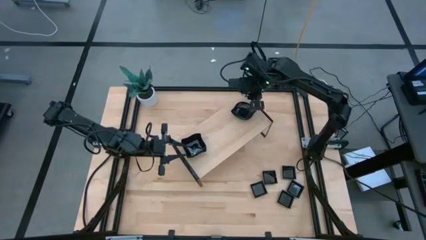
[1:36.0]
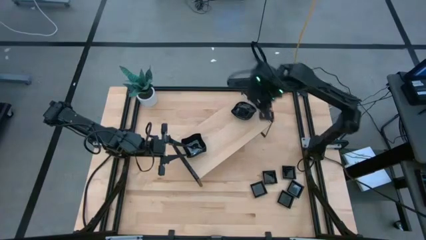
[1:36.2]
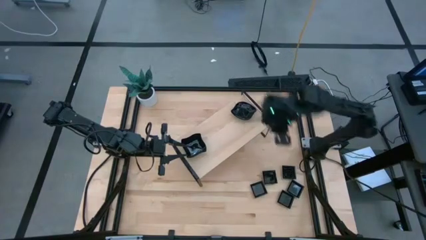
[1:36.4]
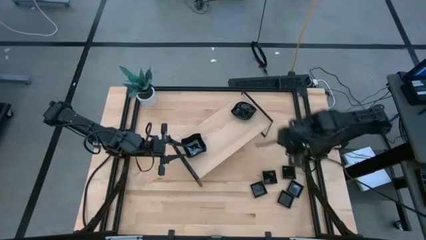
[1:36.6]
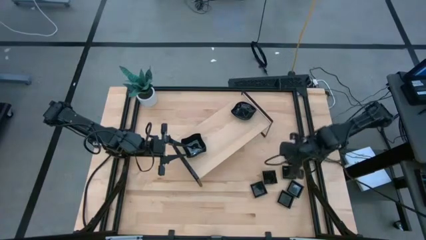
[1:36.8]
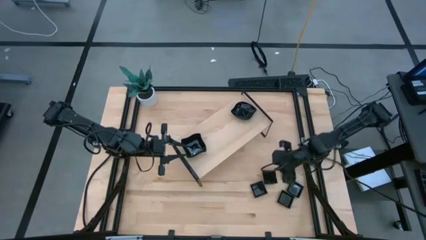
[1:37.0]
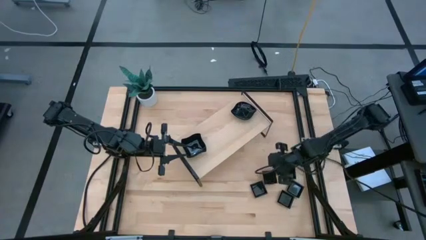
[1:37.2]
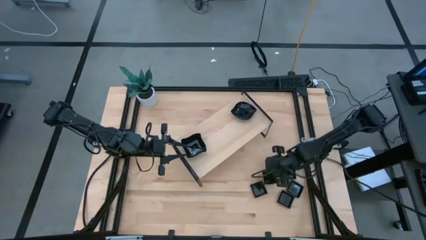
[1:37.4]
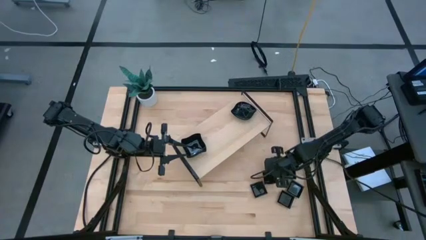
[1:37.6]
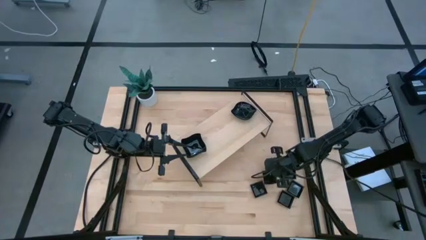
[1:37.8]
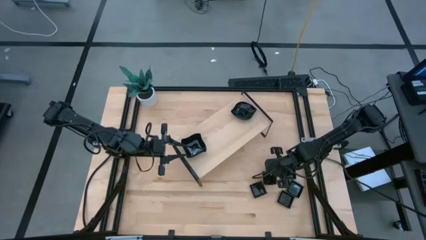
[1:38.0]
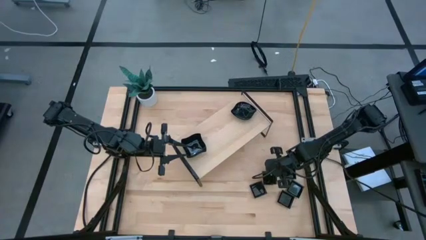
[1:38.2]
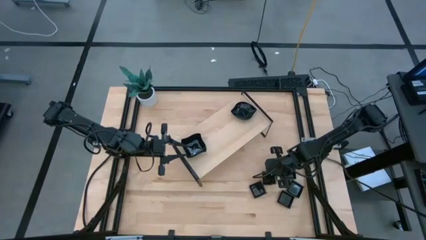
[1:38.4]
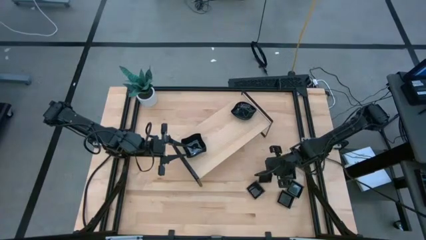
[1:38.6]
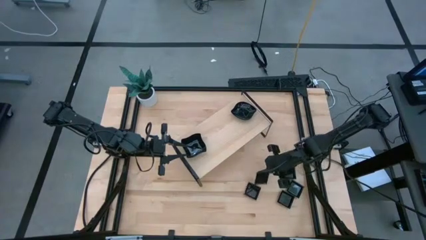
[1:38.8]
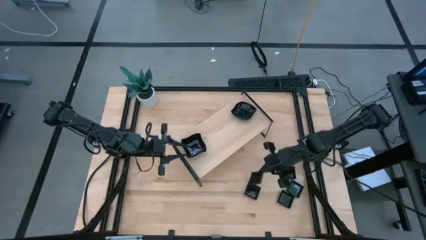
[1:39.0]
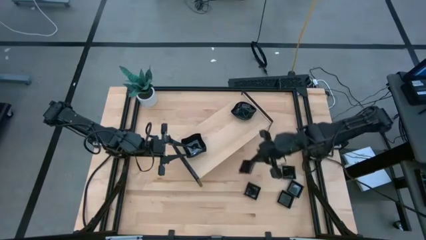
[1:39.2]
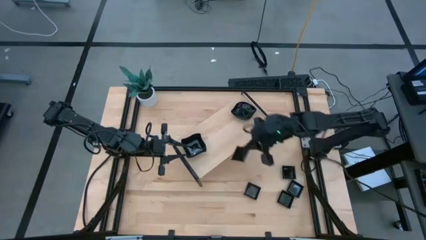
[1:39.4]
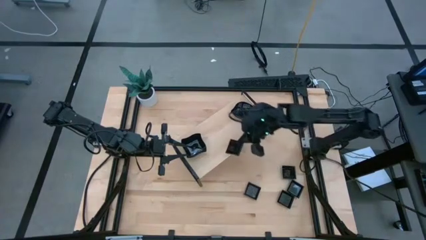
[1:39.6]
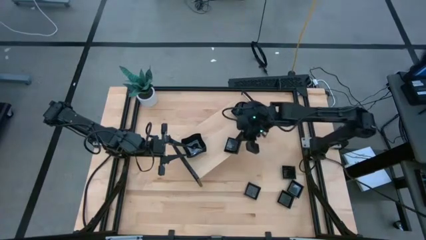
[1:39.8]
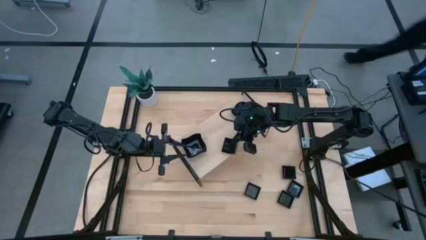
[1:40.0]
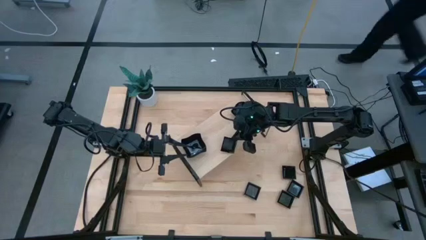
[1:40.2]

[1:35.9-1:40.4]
Task: Pick & Place Mini shaped plates
Put the square plate on the shelf

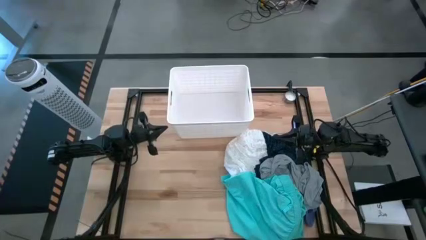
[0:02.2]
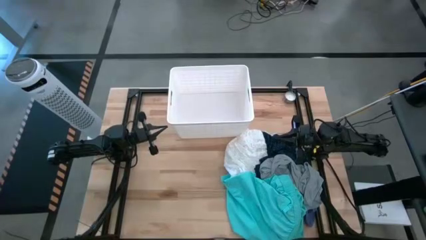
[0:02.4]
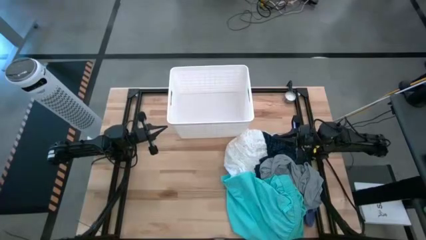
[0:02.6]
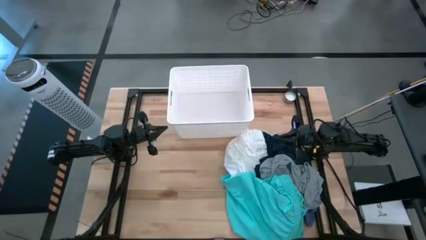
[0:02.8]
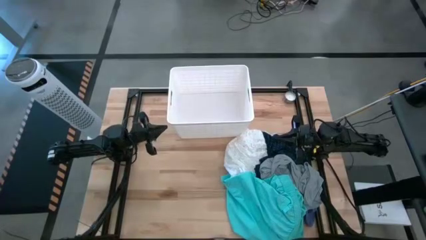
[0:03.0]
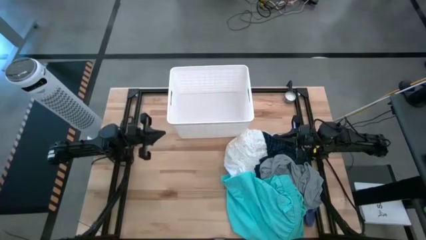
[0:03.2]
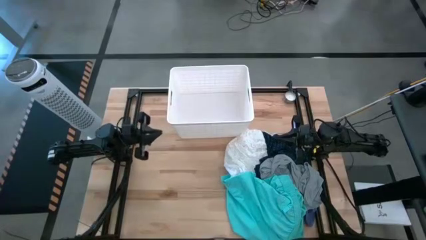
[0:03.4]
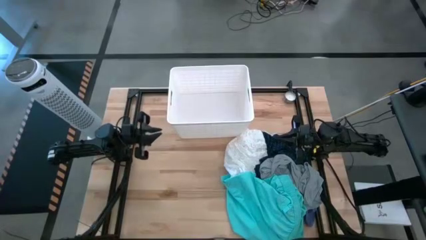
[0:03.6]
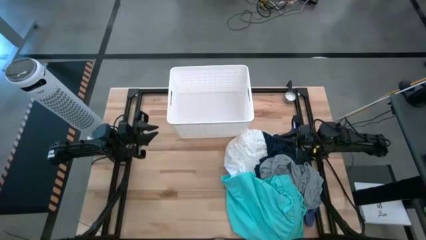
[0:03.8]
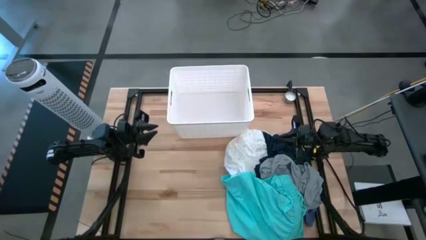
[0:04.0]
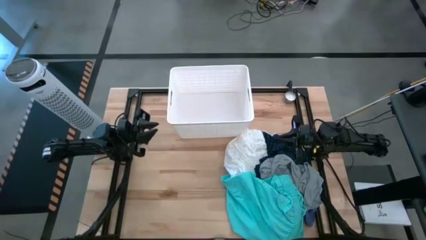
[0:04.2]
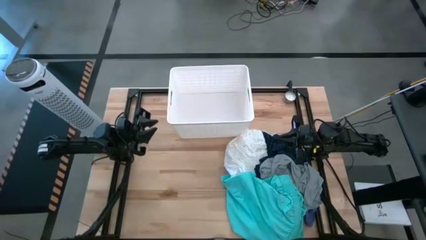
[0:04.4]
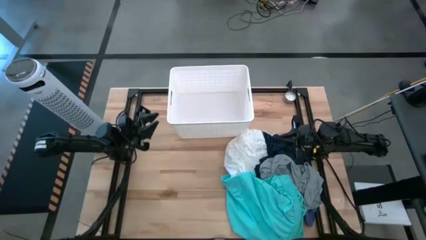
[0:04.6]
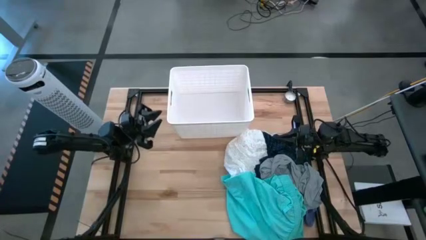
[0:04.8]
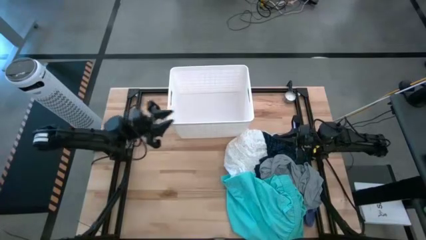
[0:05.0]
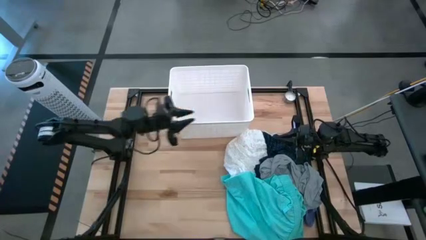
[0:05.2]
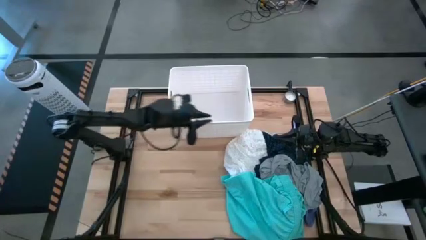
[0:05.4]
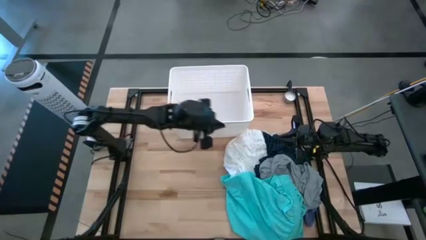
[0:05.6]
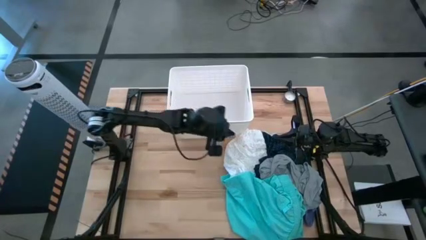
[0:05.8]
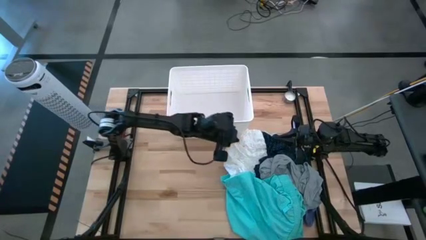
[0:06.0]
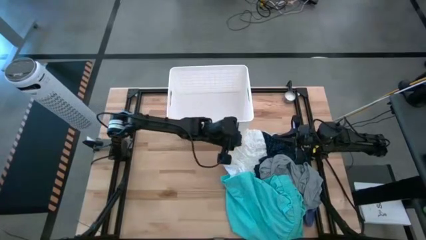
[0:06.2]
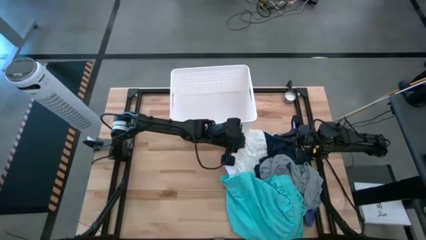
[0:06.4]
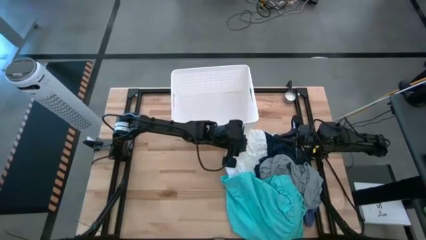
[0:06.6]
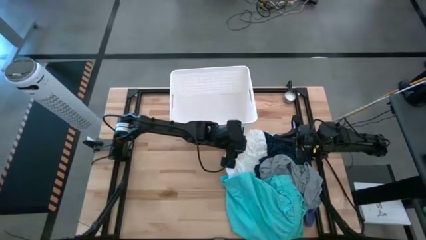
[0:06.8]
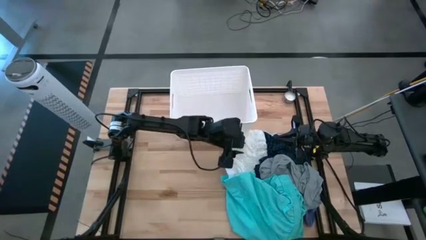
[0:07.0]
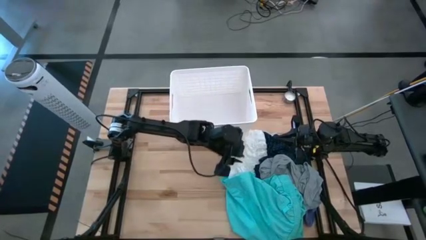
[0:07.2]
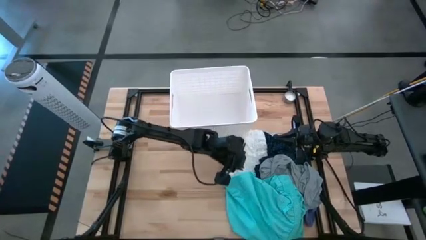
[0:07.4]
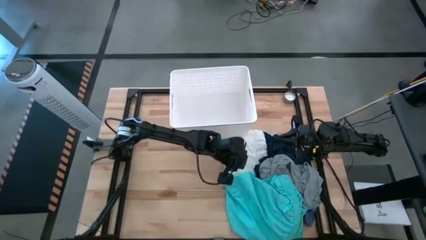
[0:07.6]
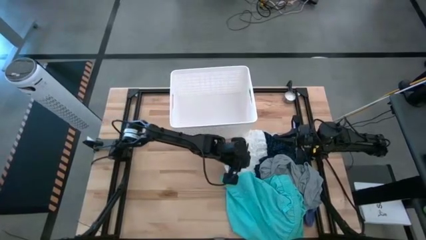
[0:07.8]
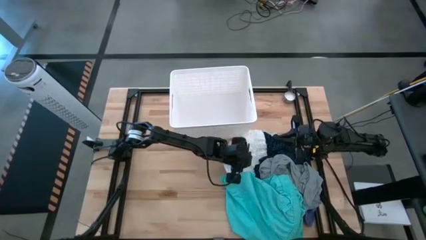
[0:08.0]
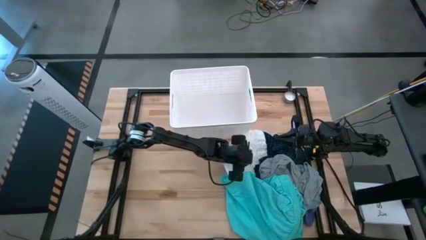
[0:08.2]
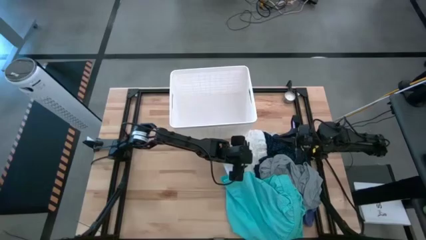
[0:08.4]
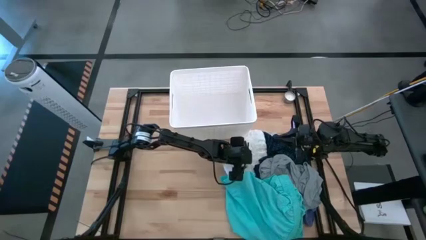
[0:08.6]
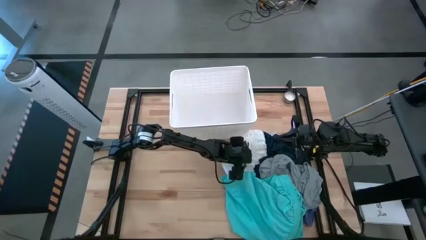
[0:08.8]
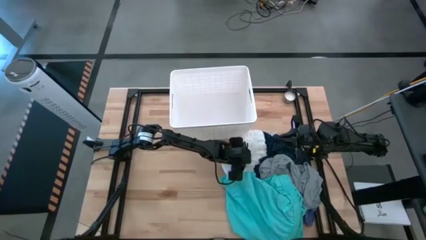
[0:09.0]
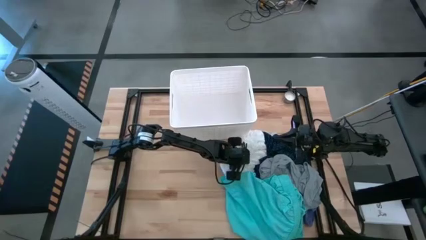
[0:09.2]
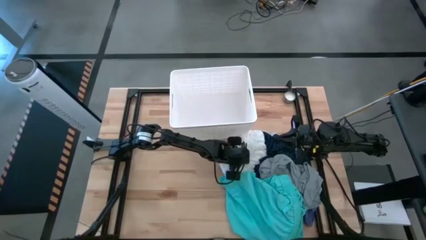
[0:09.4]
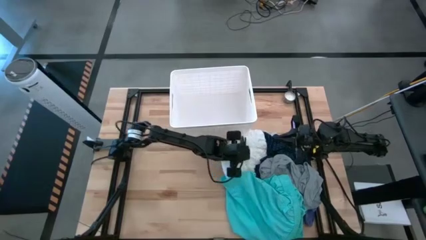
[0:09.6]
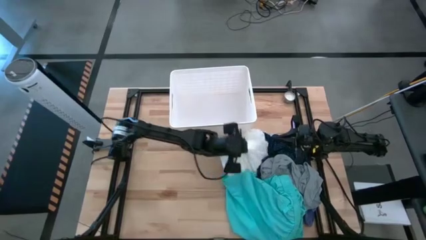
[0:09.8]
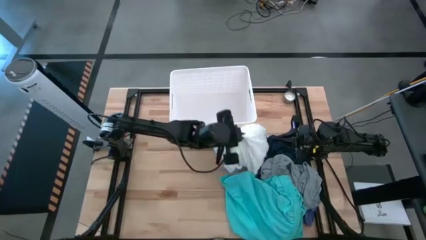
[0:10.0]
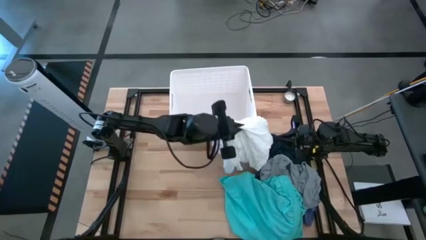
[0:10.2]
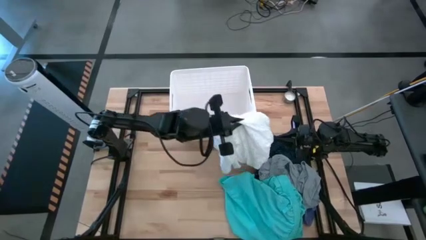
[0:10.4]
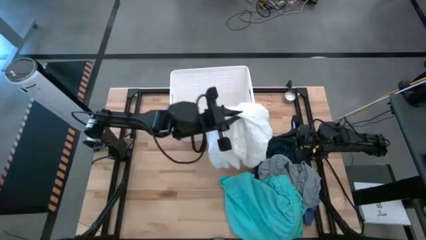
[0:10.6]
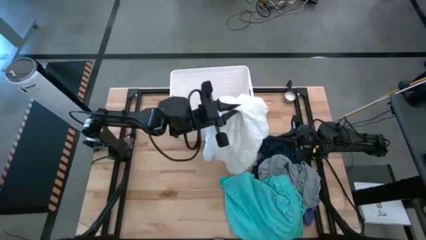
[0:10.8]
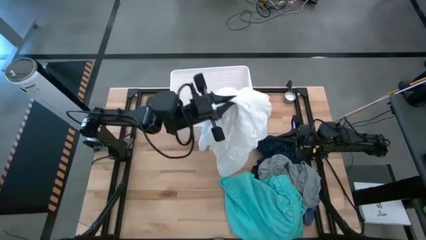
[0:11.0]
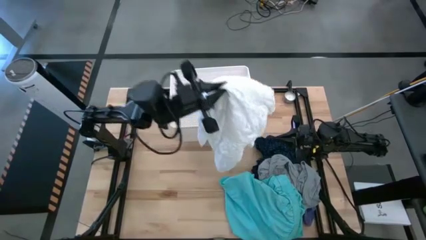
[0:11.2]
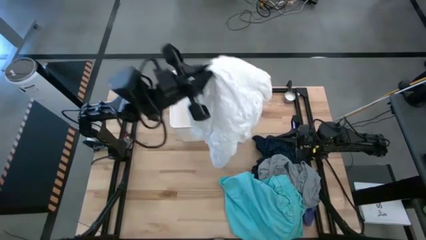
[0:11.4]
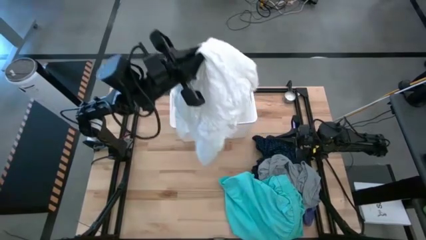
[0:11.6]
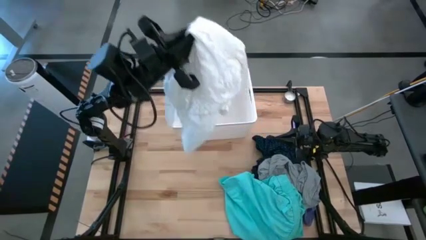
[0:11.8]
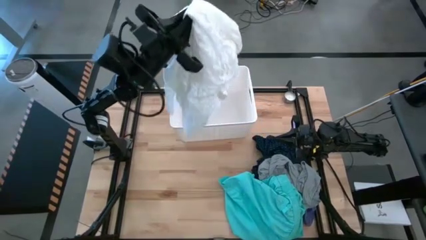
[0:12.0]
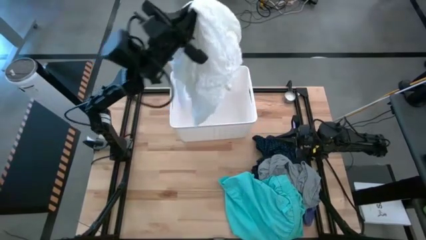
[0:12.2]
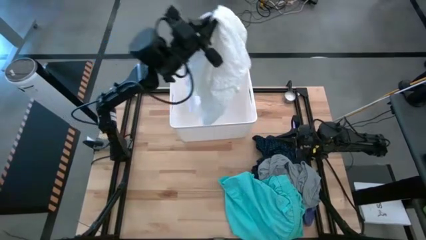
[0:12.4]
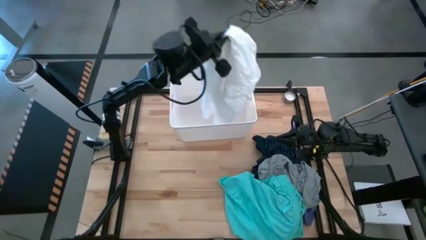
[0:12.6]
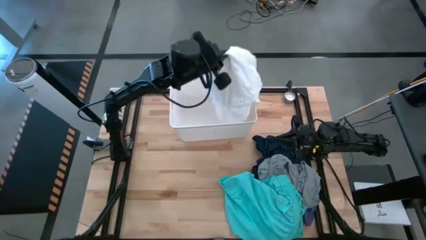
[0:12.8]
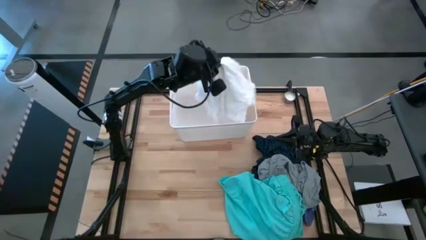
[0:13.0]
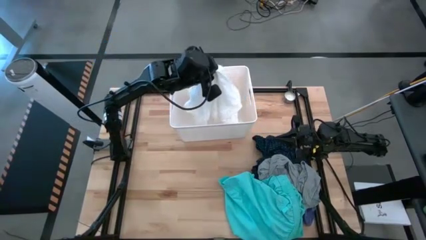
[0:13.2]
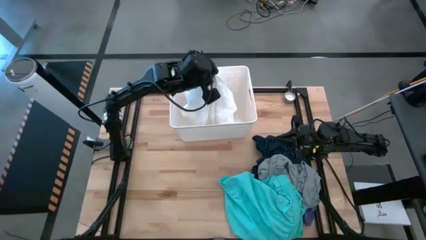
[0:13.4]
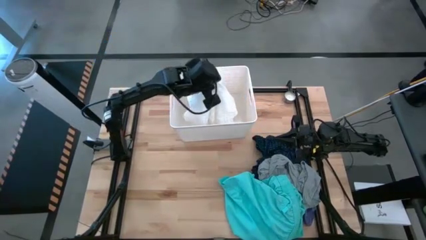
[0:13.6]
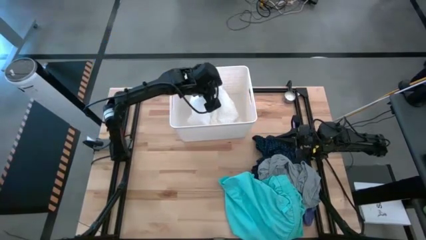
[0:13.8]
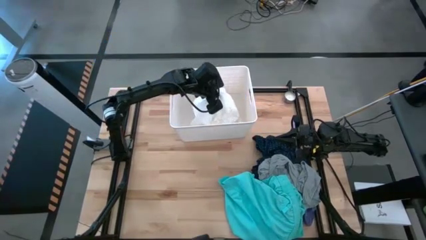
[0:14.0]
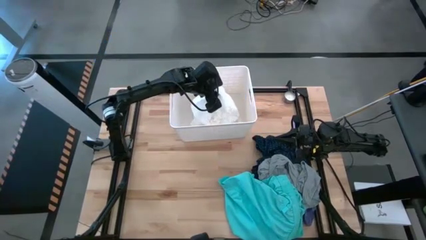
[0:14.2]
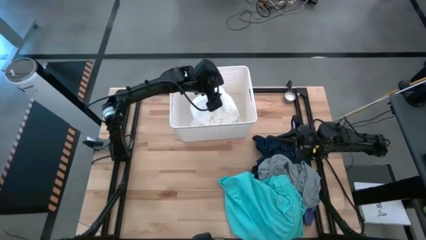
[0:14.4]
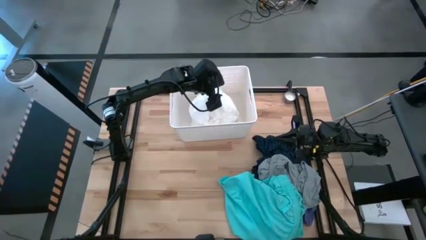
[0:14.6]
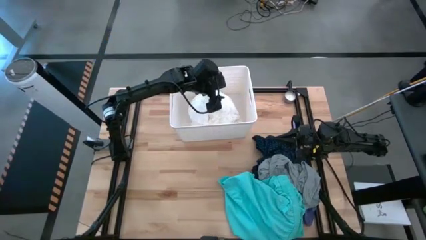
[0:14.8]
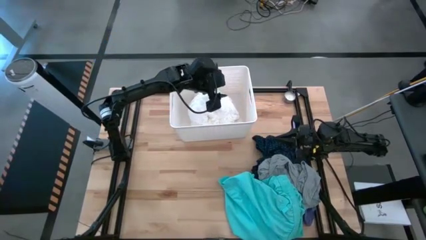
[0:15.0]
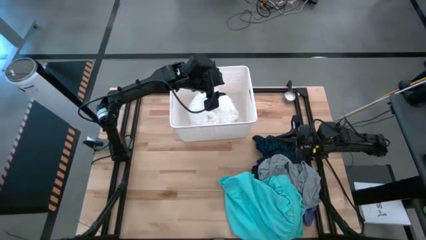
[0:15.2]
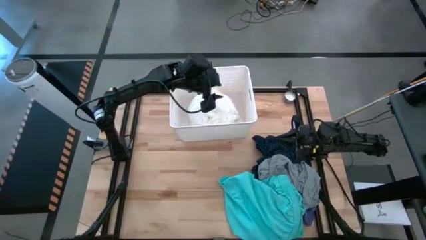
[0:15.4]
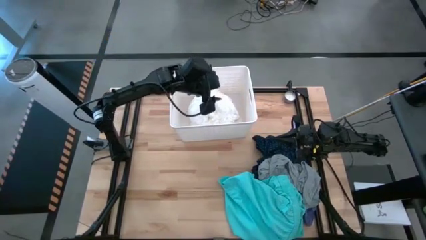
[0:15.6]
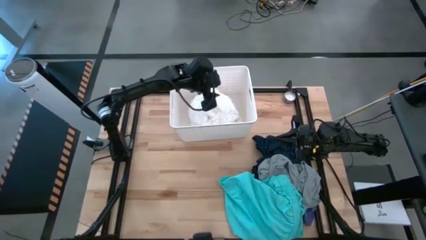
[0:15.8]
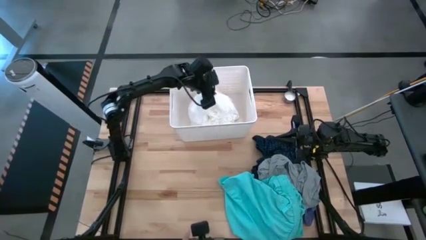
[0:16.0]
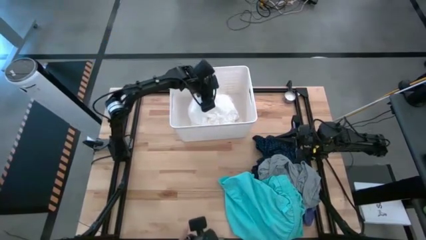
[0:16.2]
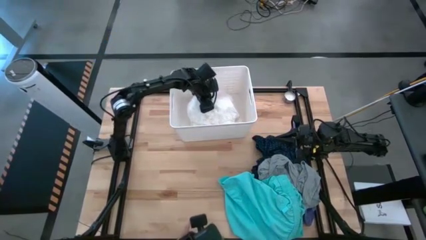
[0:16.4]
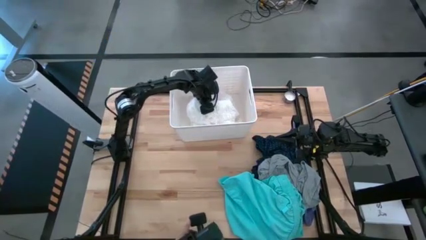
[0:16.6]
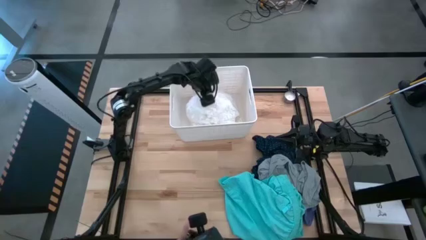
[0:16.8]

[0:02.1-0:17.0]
Task: Sort clothes
Put the white shirt into the white laundry bin
